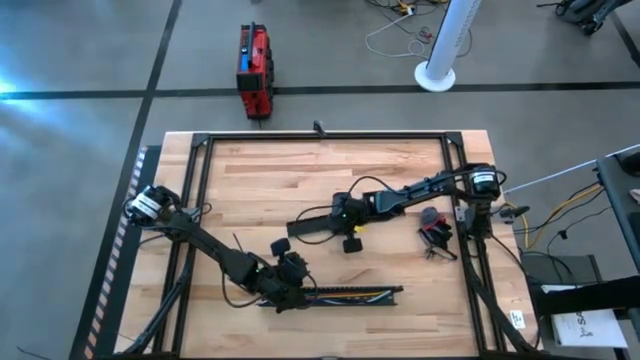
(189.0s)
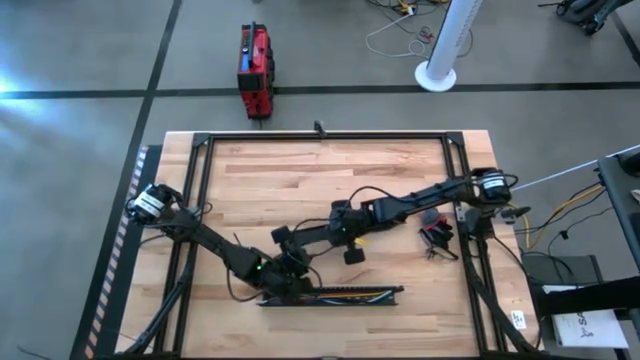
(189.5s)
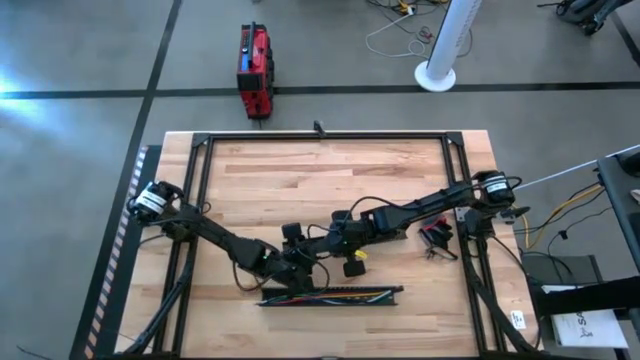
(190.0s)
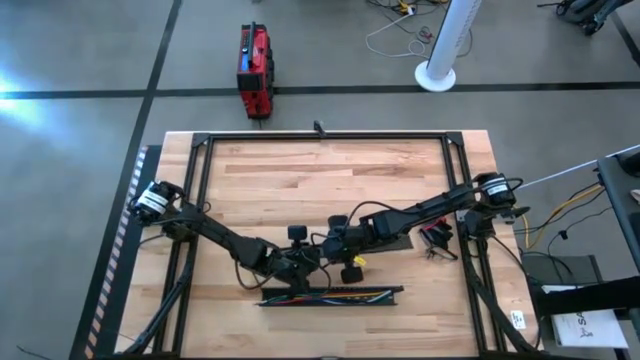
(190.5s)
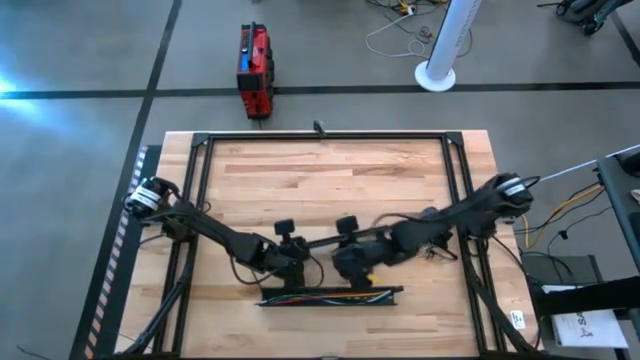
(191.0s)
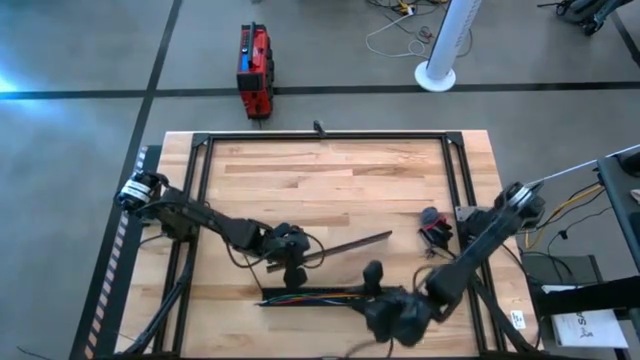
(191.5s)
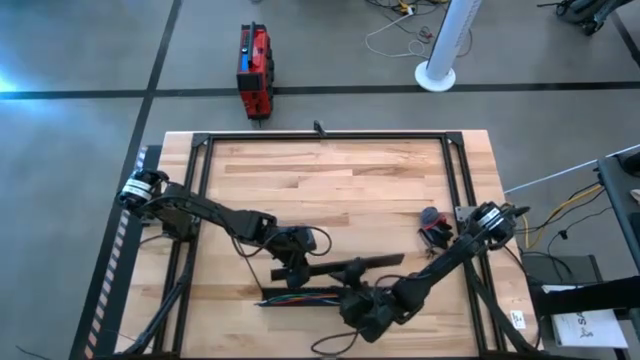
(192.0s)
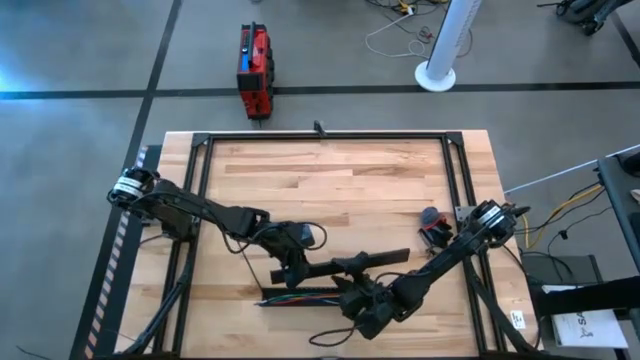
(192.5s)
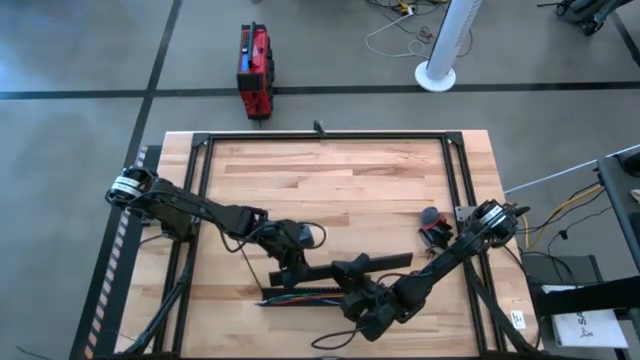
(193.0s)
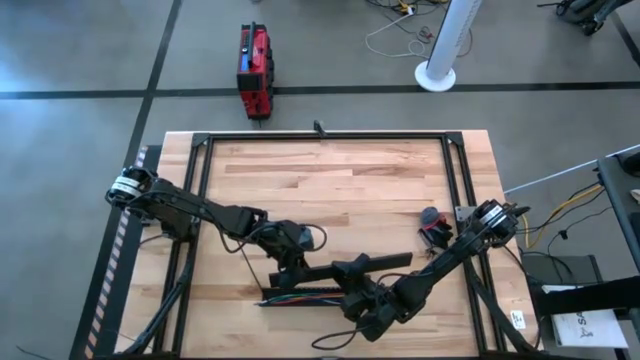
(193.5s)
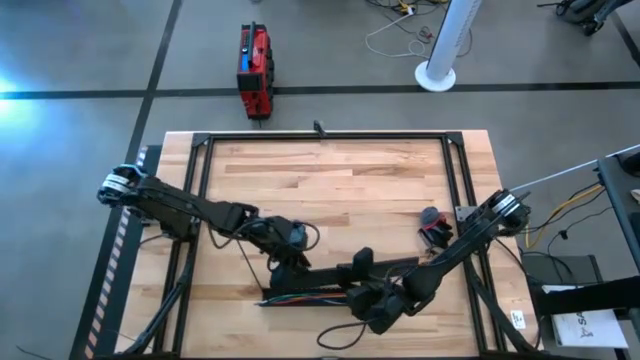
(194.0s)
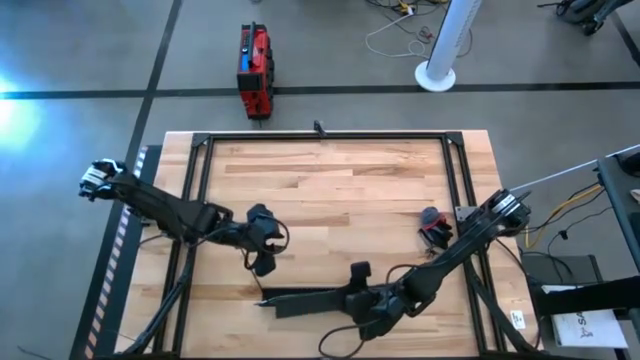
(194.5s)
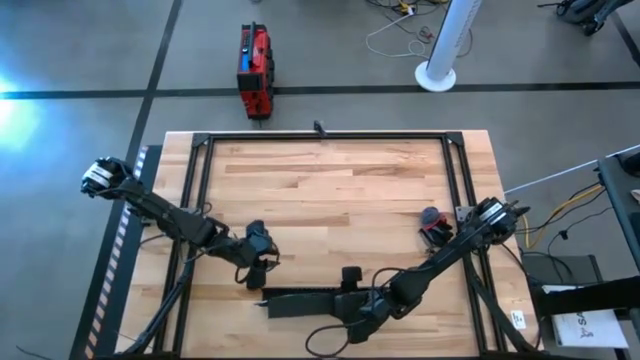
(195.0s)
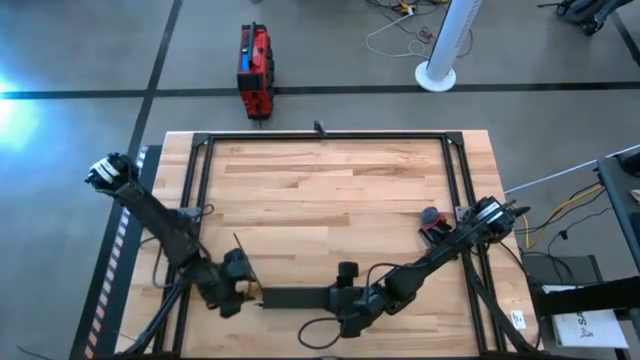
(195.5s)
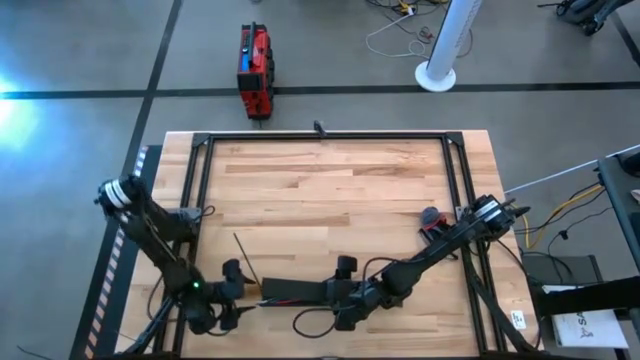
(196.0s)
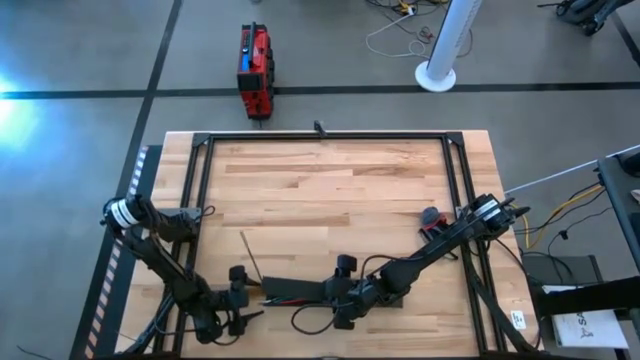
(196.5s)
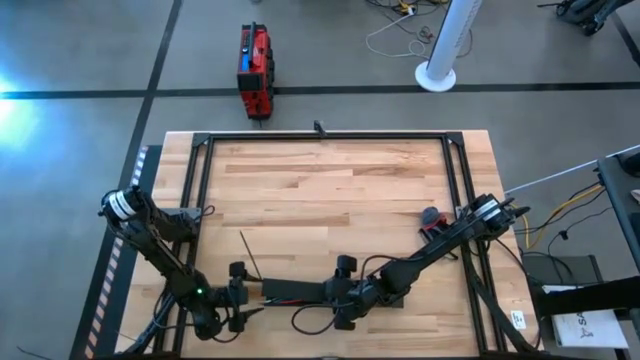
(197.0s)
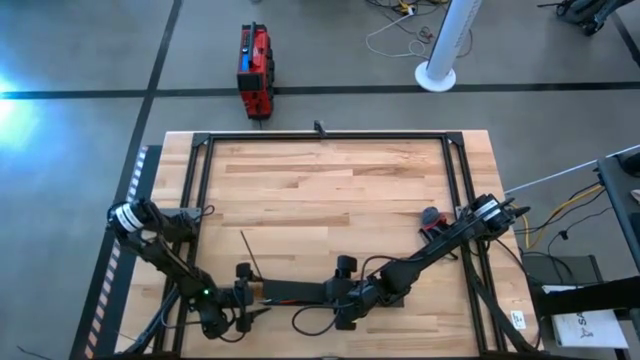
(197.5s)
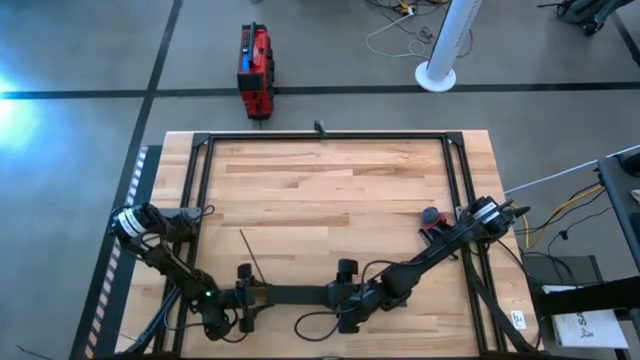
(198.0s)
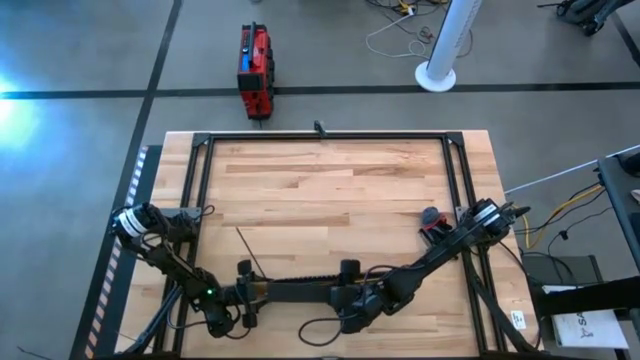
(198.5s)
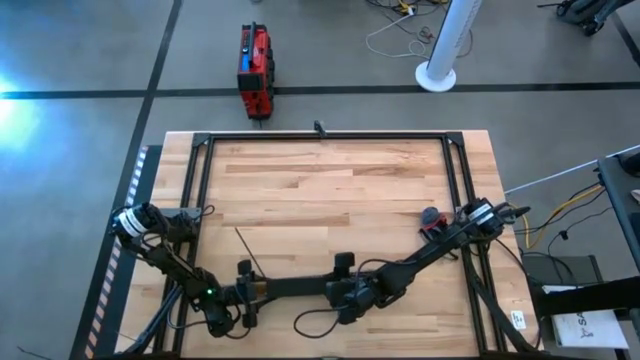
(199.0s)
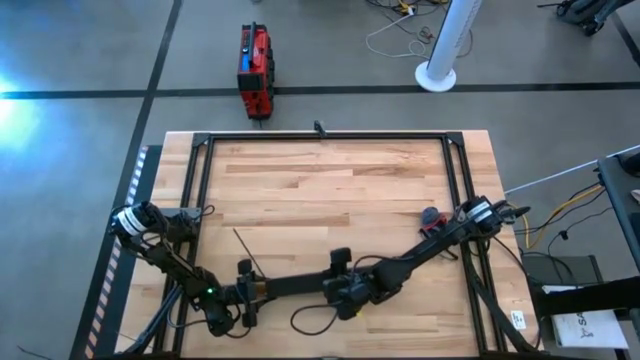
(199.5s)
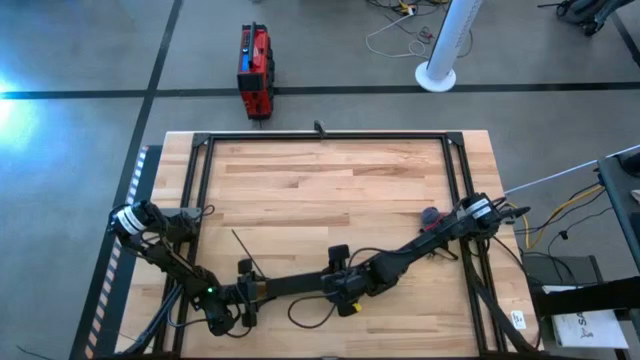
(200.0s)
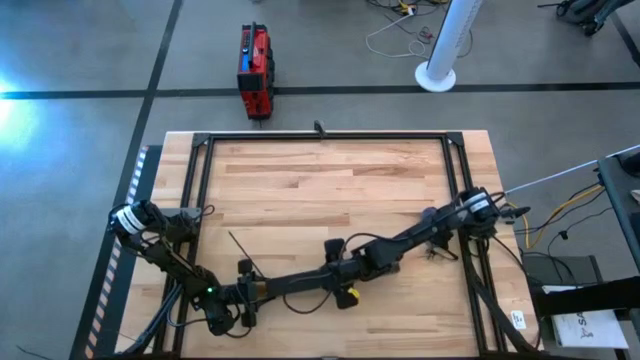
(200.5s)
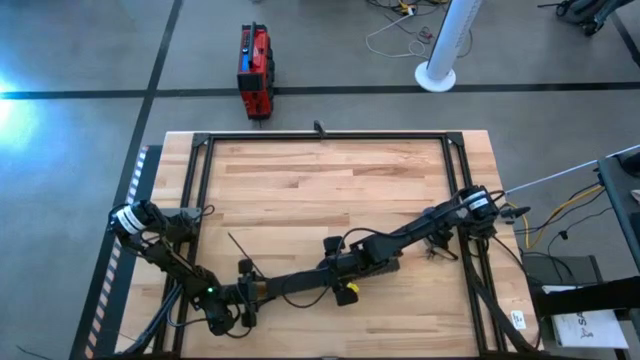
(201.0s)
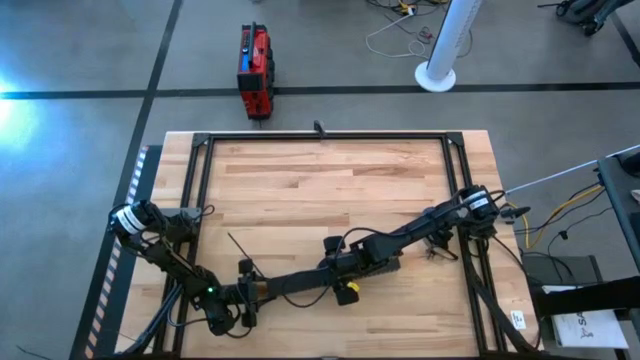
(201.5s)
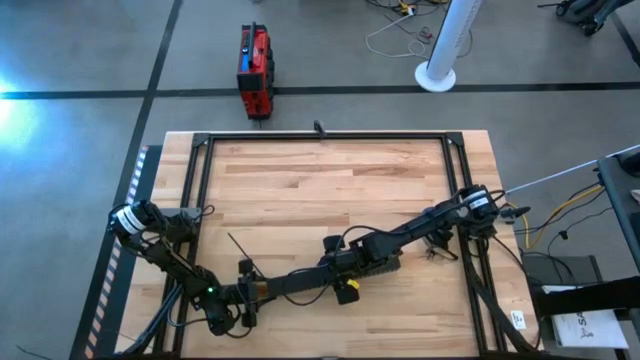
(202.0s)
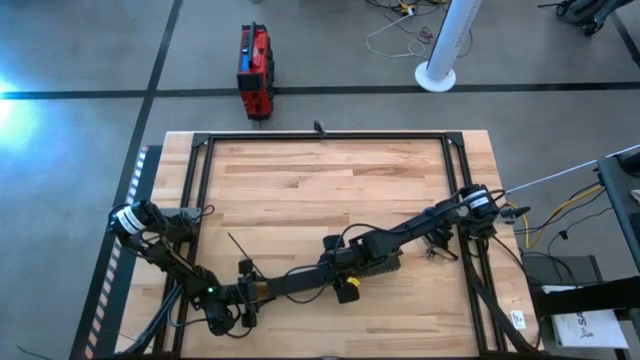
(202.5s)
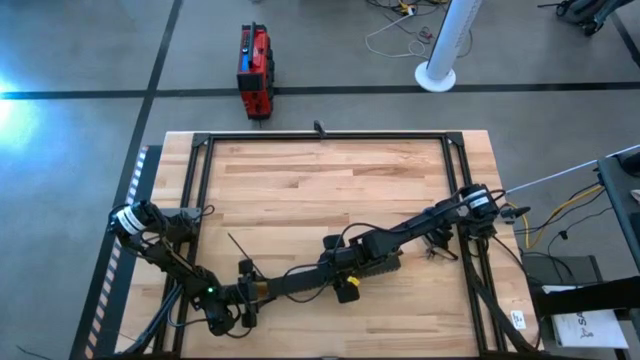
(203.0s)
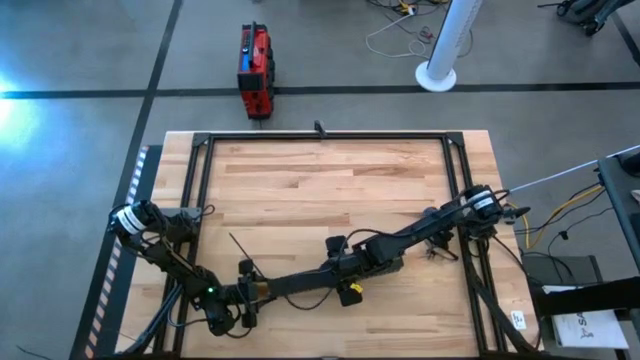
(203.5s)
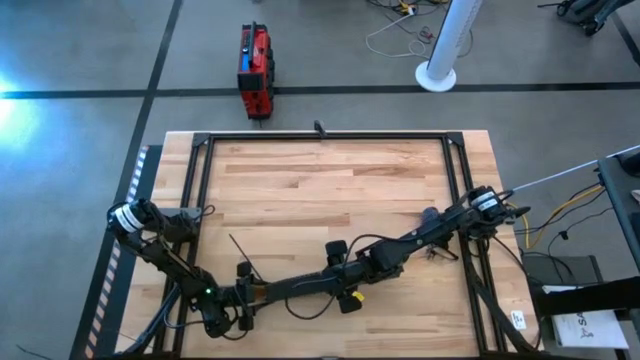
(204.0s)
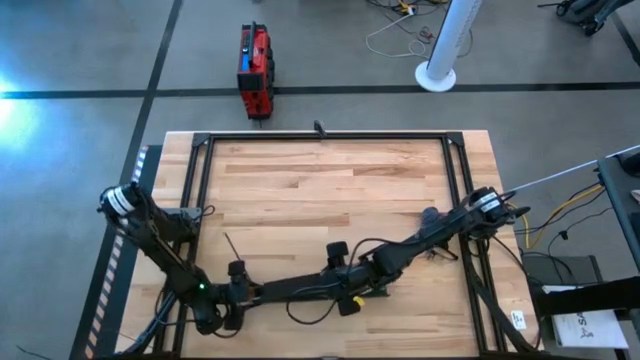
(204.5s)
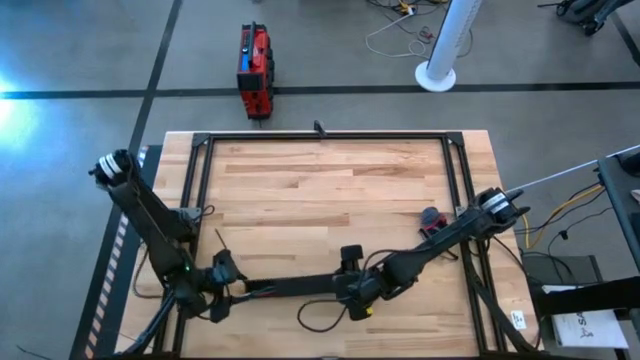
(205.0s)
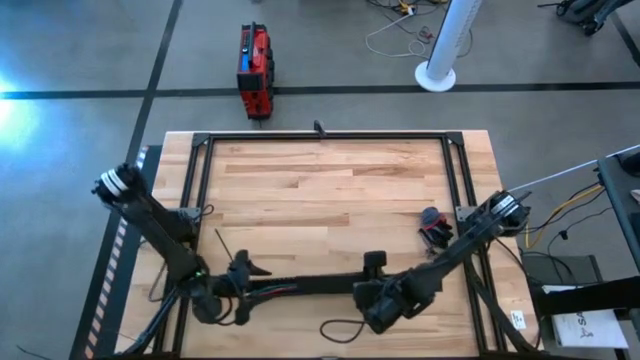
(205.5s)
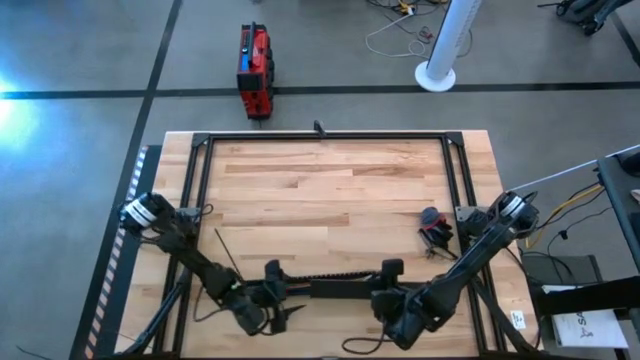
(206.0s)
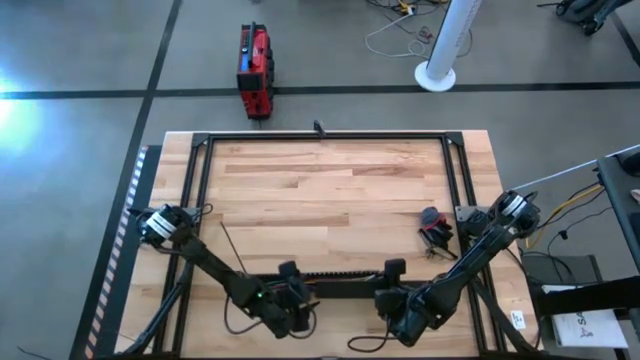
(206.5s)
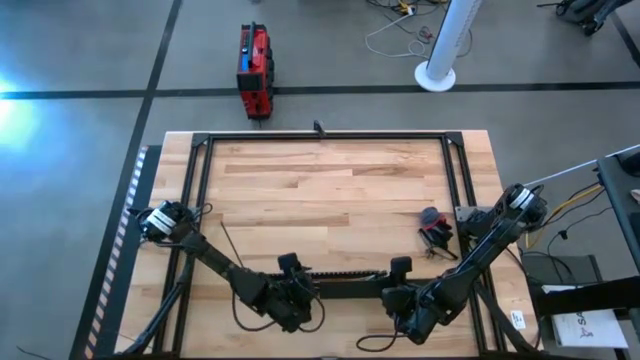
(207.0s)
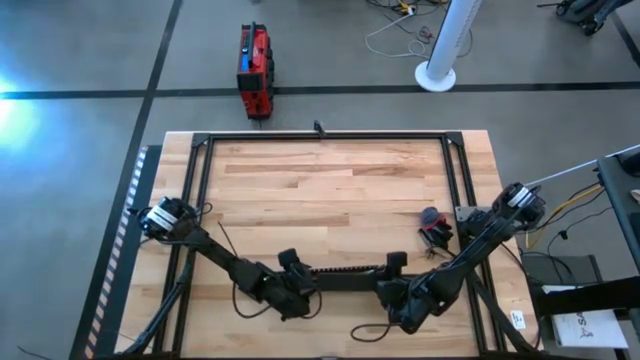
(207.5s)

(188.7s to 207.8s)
Task: Ziptie cables
Close the cable duct using the cable lid

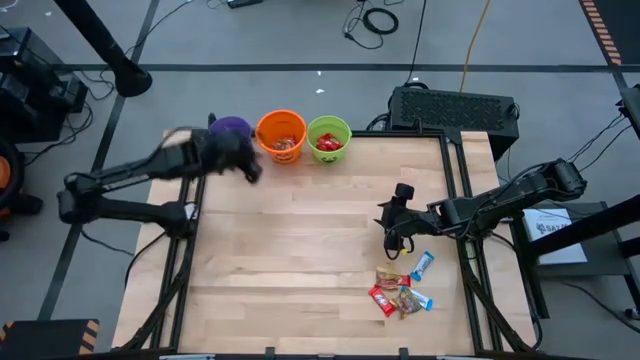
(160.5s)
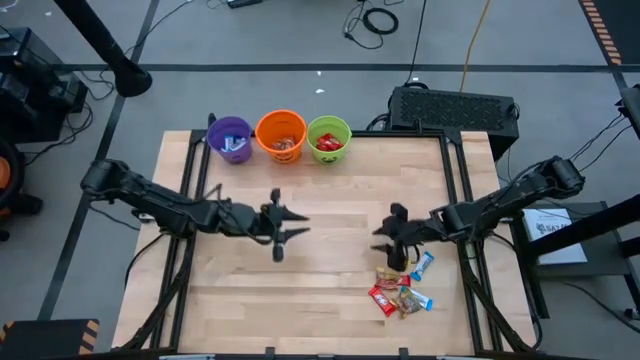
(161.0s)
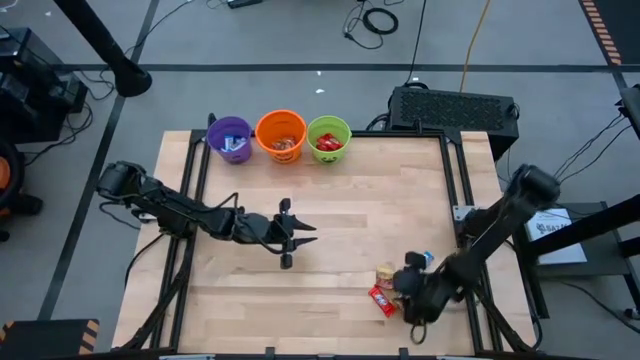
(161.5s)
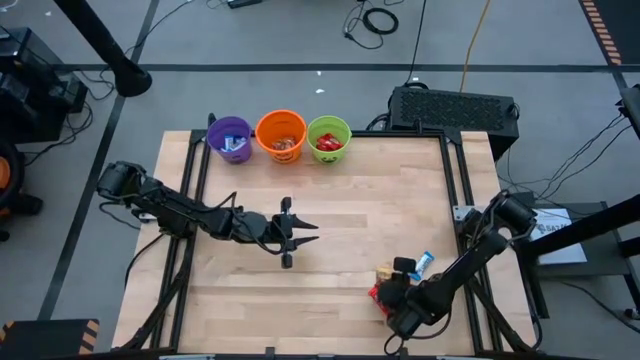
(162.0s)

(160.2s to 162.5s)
Task: Sort candy by brand, put in halloween buckets
Put golden candy into the orange bucket
